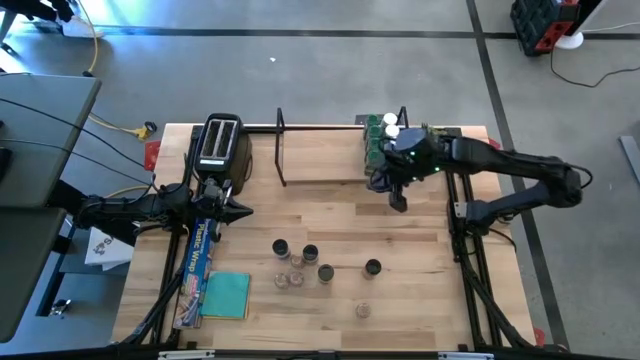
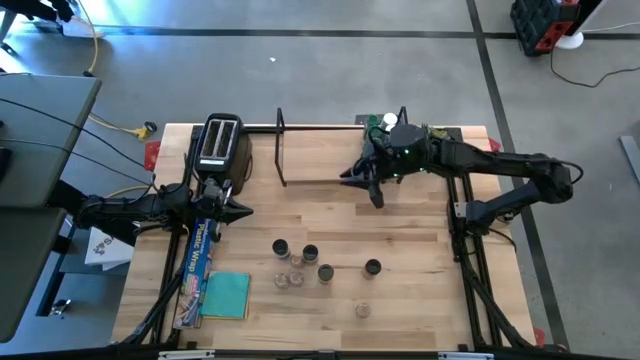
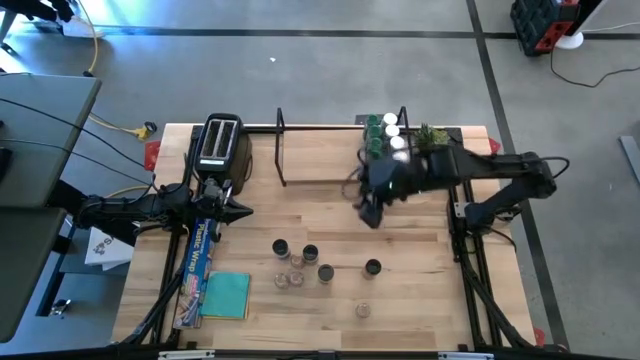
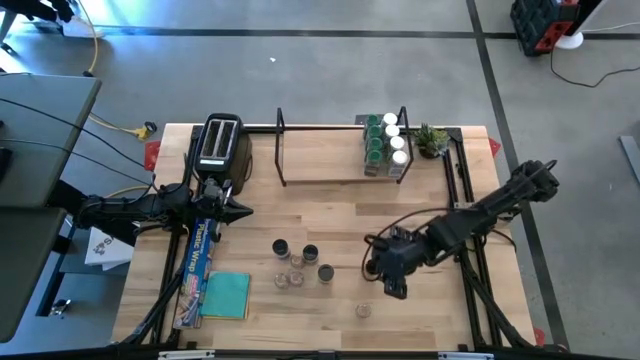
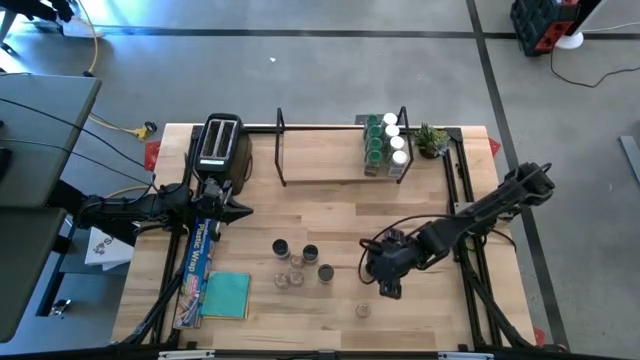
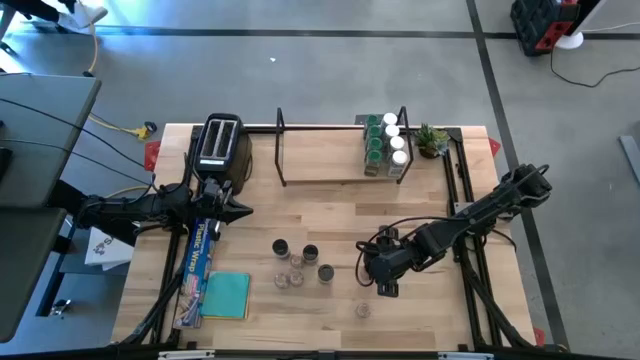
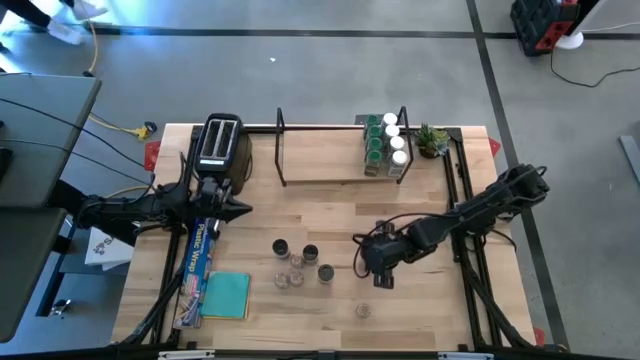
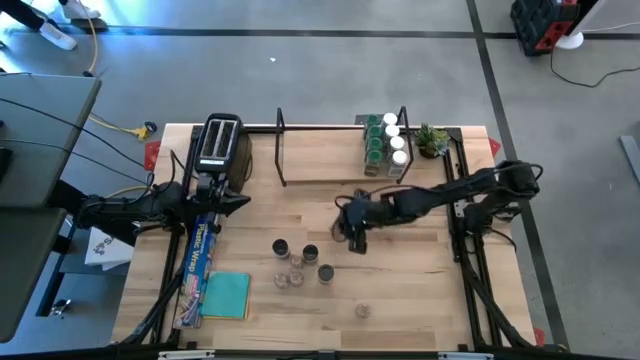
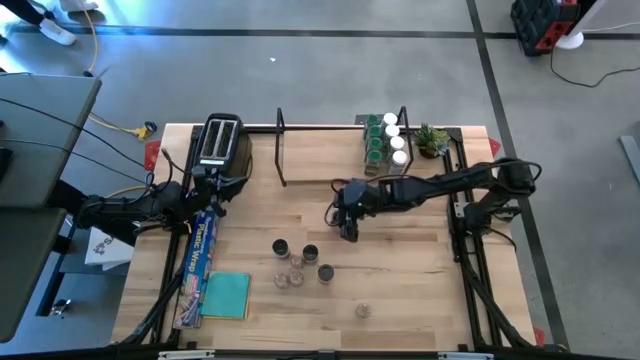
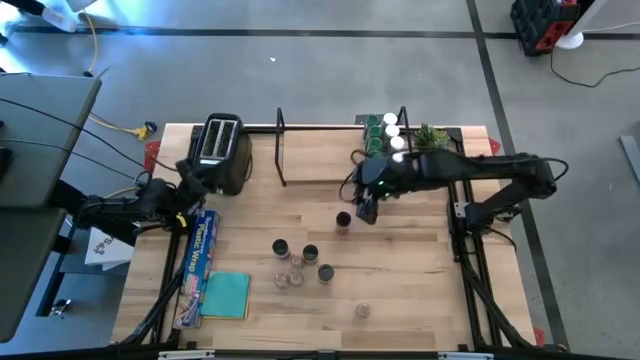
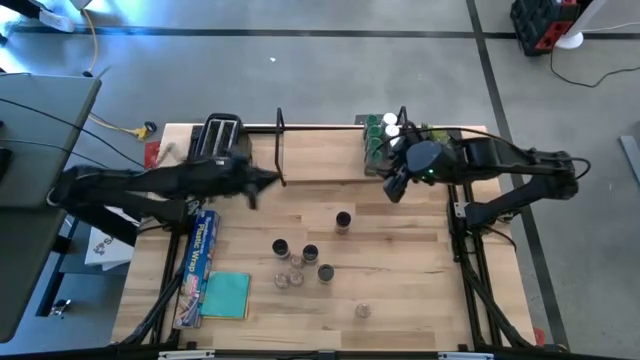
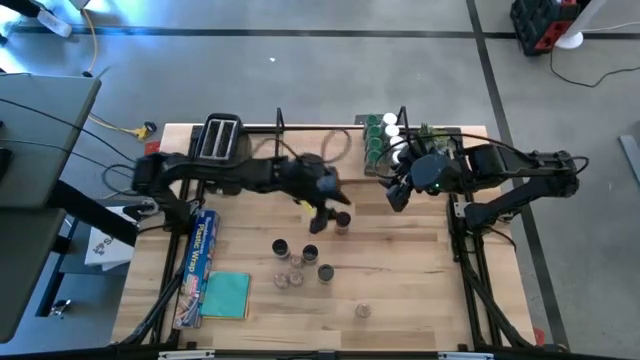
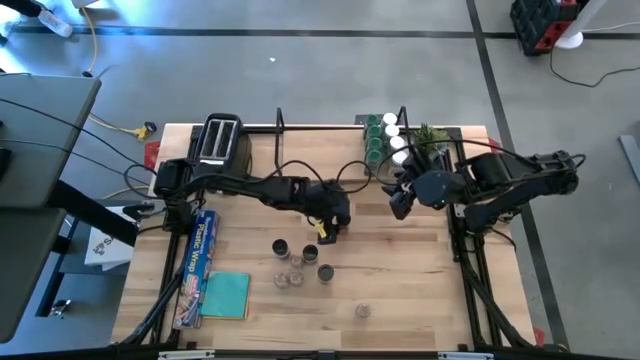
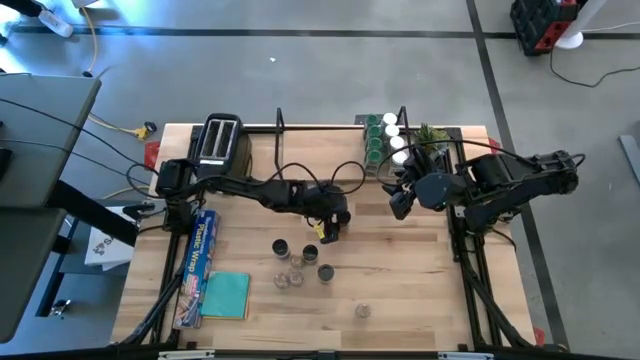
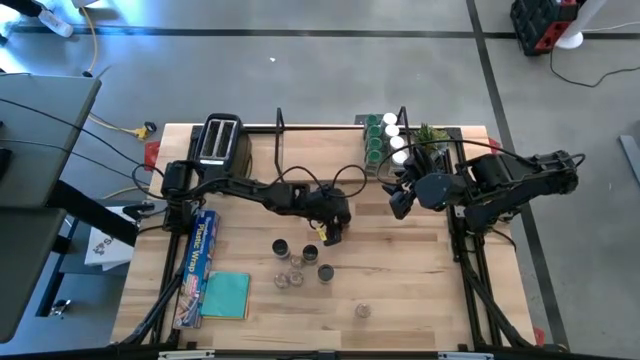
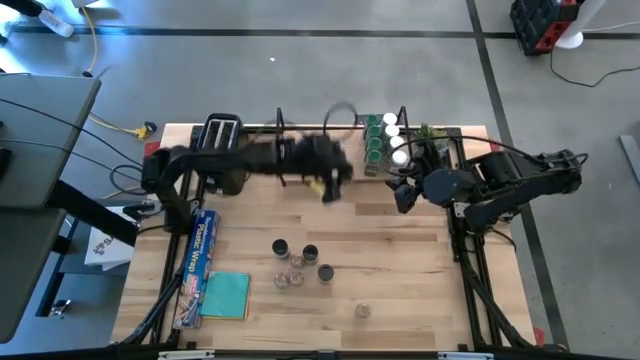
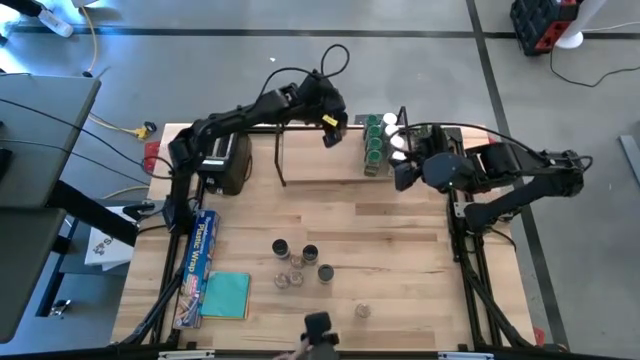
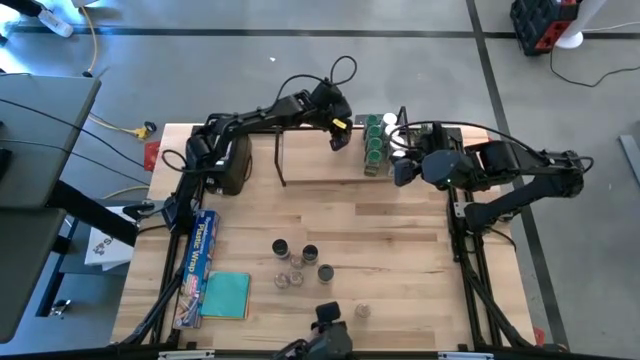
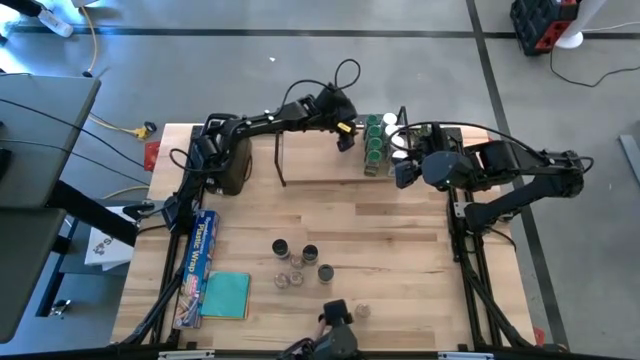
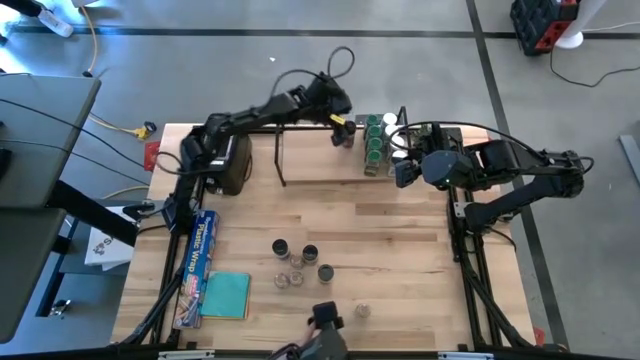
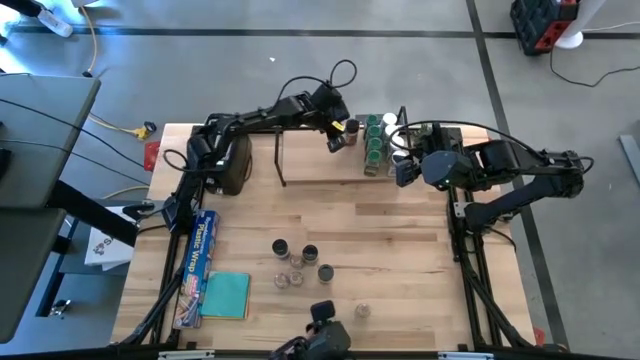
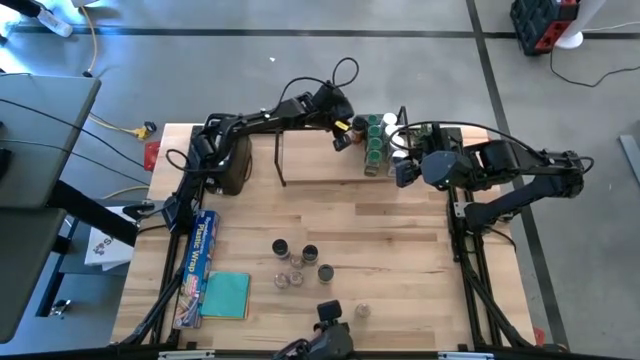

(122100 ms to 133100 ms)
Task: Shelf spices
Put the black seasoning bottle on the shelf

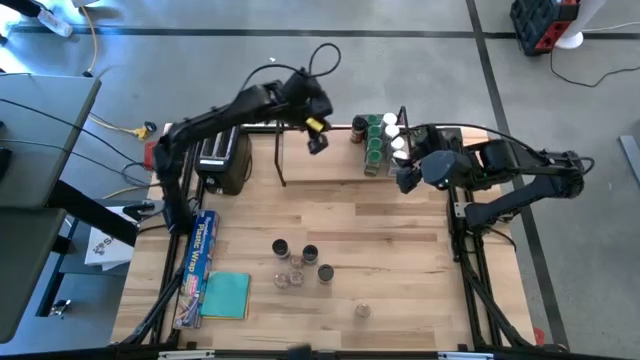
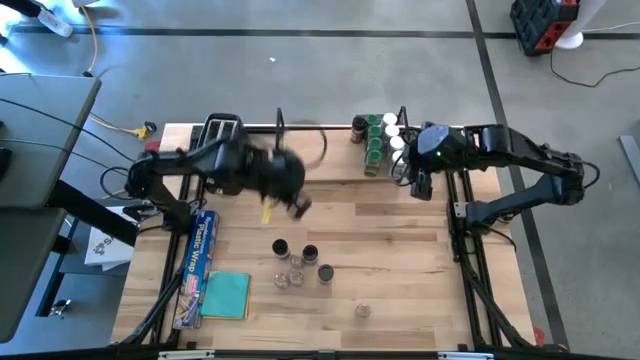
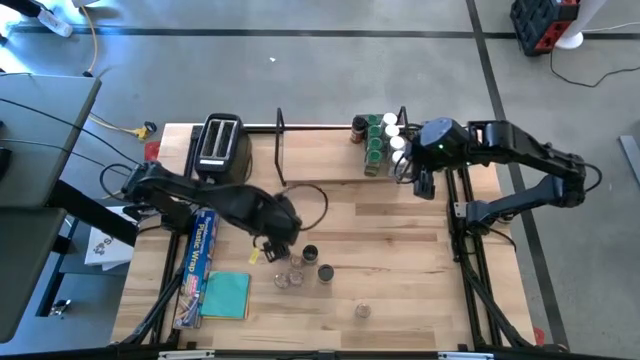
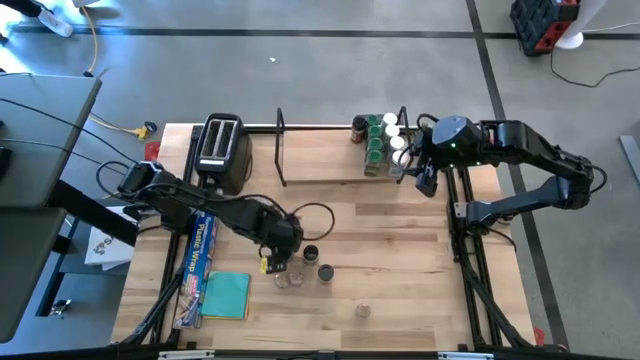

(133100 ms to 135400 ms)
Put the black seasoning bottle on the shelf and align it with the other black seasoning bottle

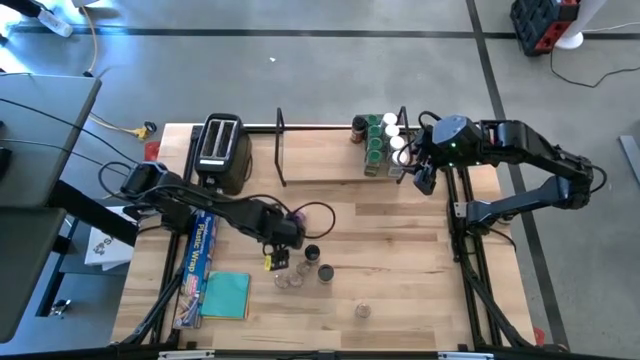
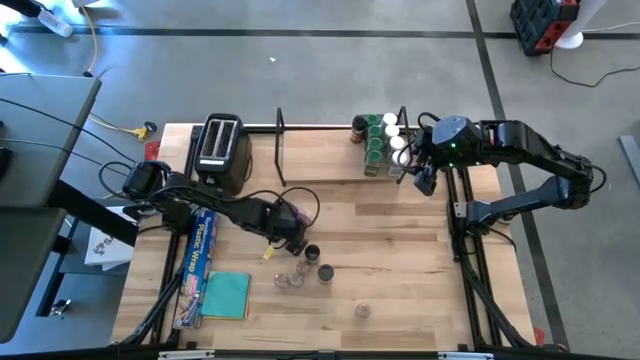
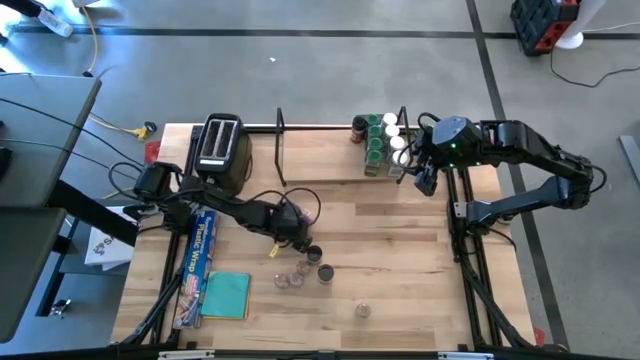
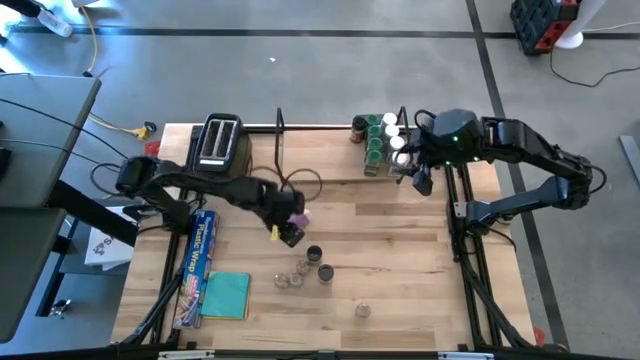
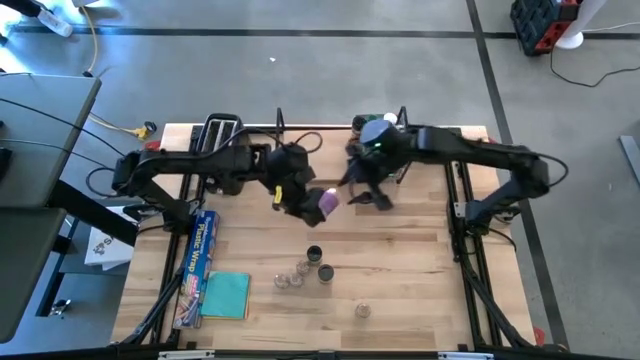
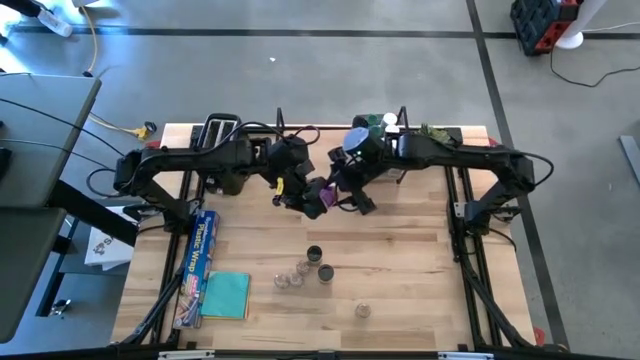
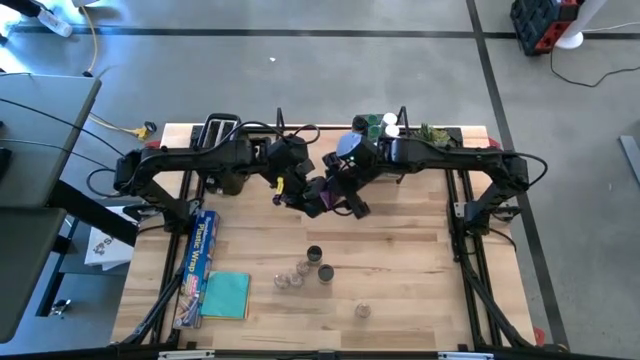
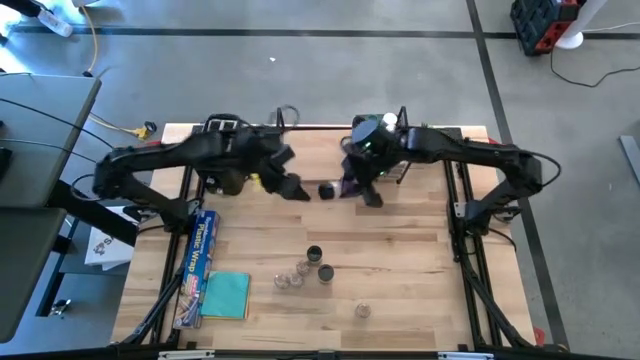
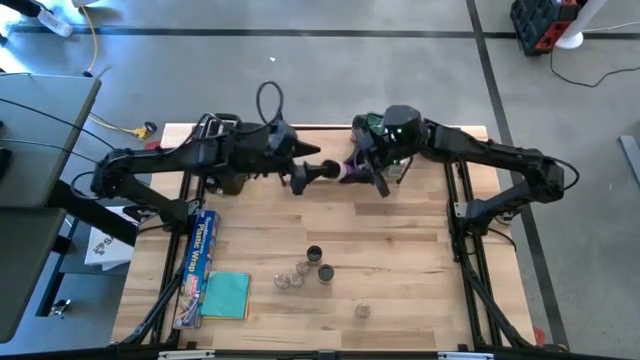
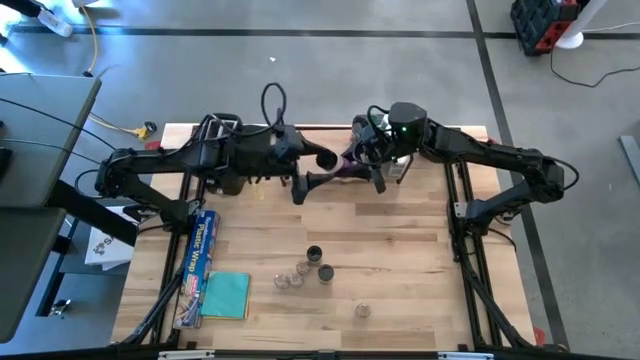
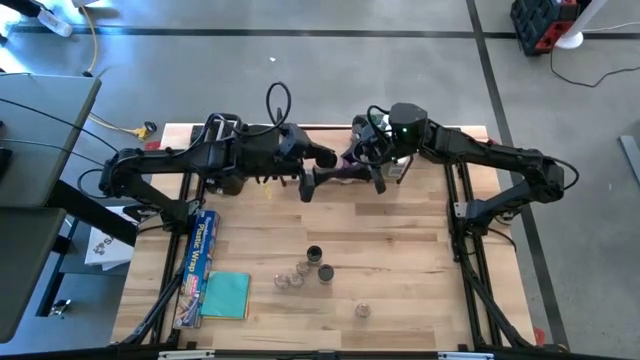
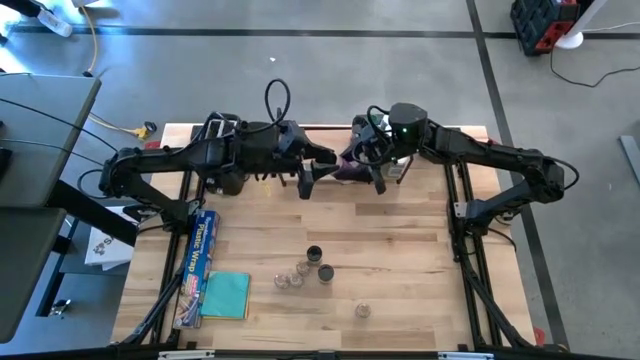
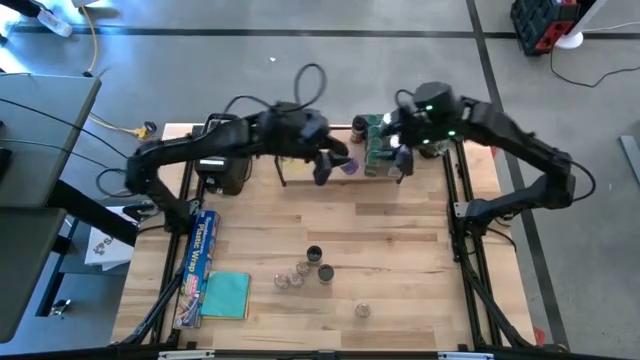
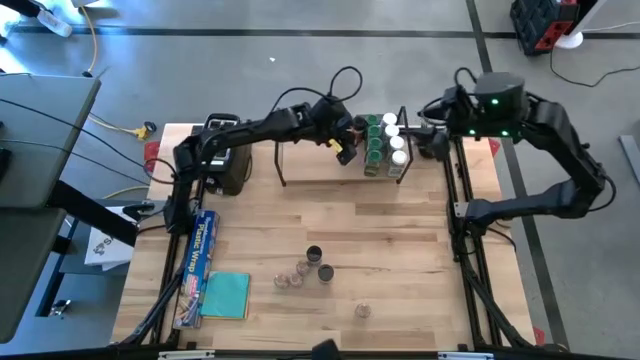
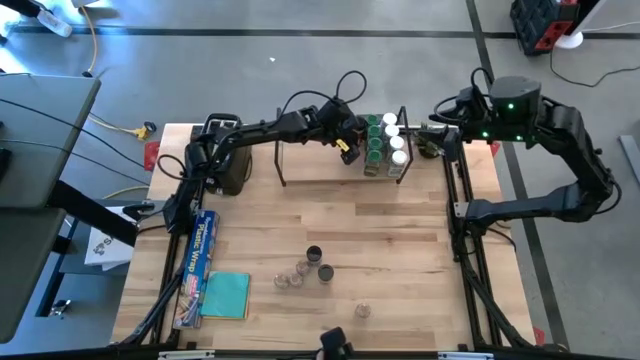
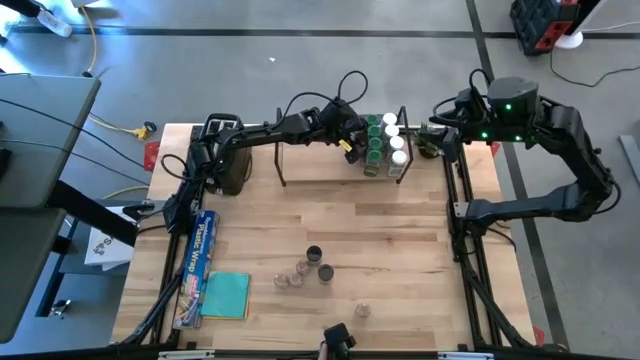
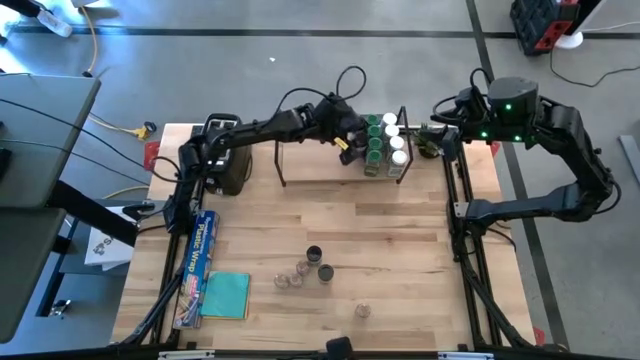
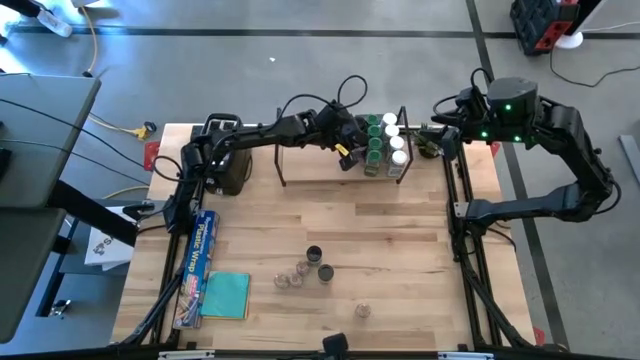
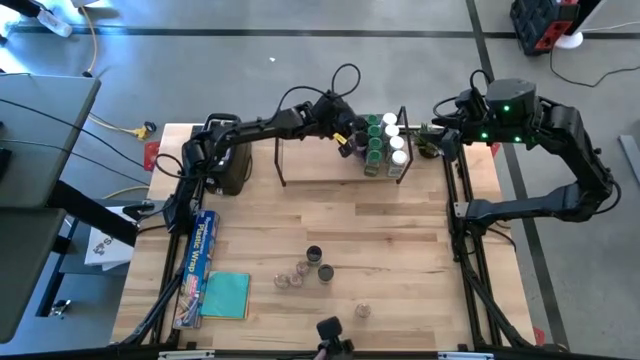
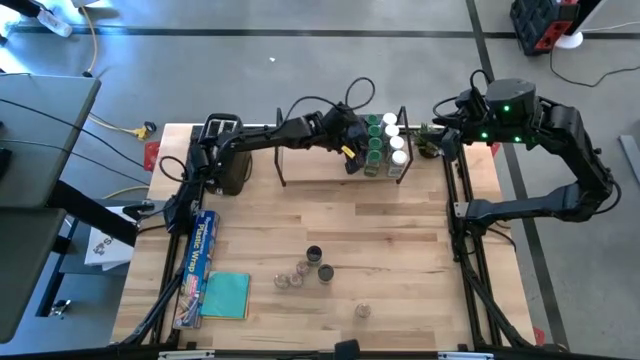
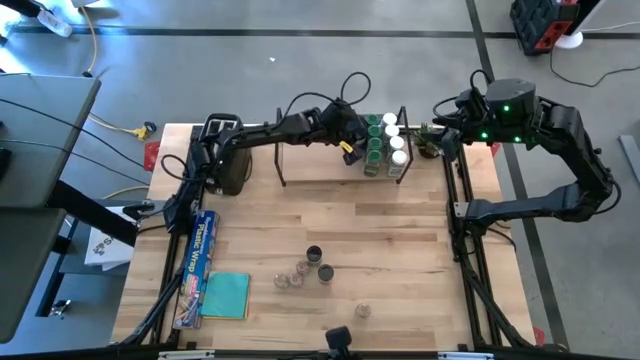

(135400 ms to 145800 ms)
Put the black seasoning bottle on the shelf and align it with the other black seasoning bottles
